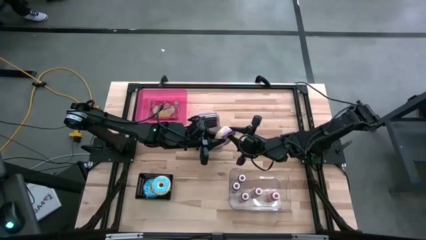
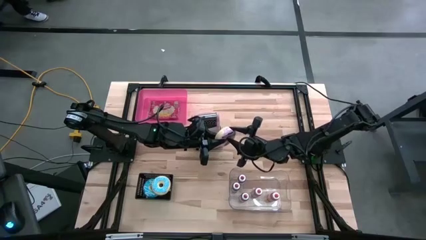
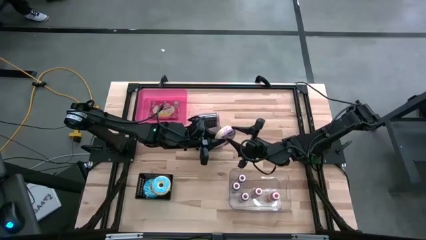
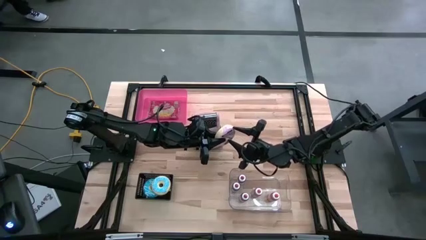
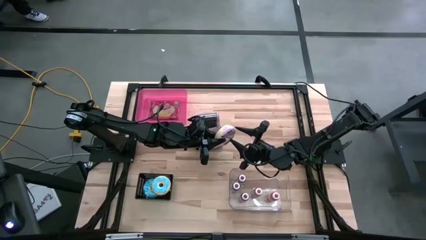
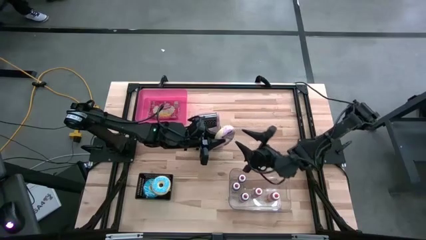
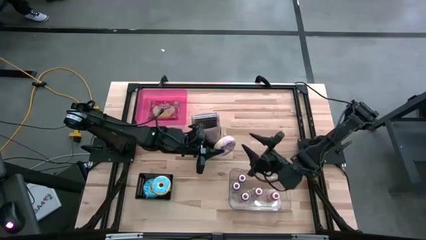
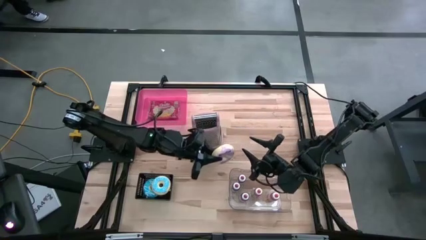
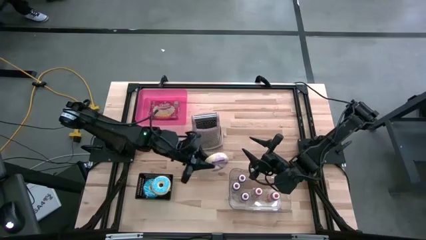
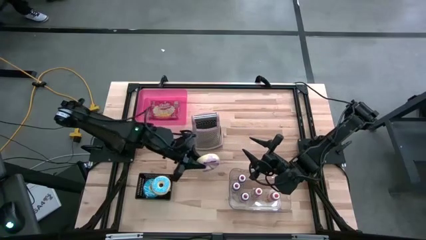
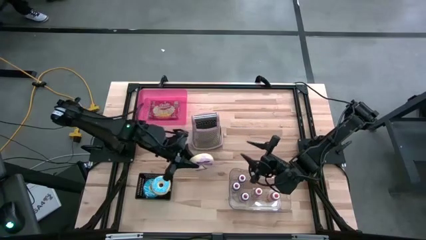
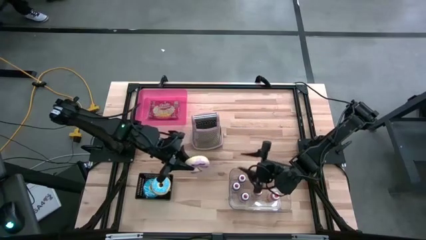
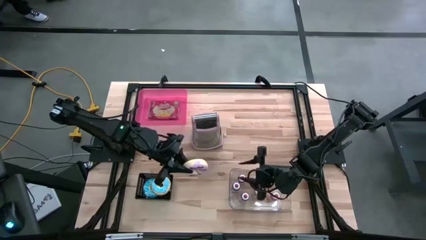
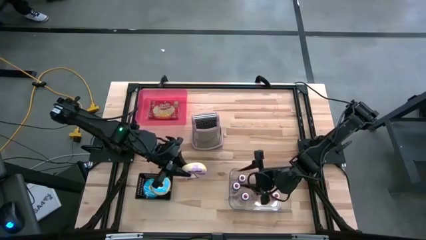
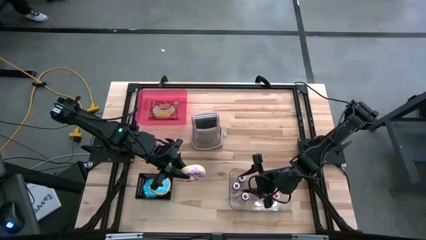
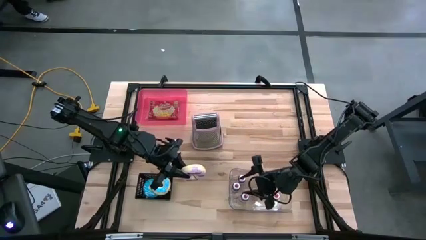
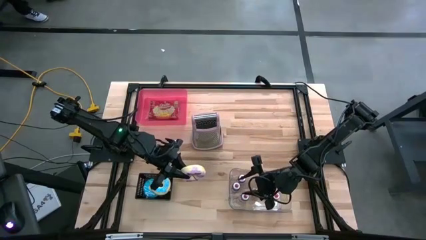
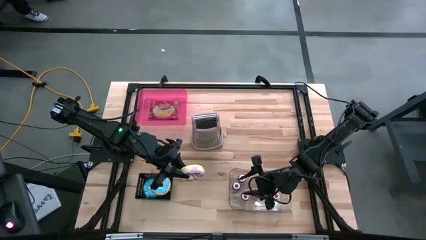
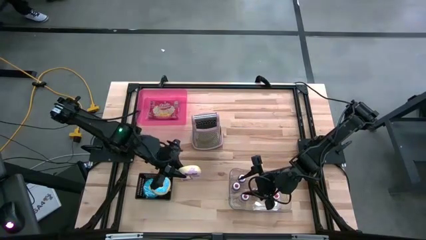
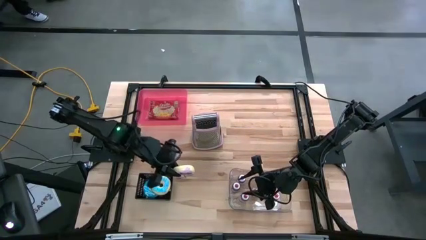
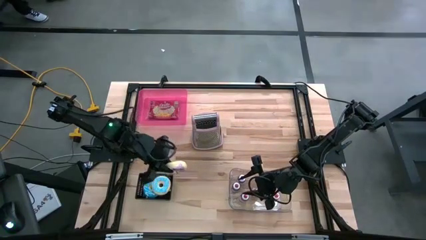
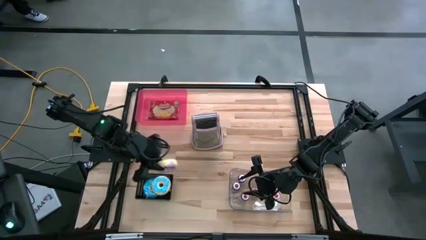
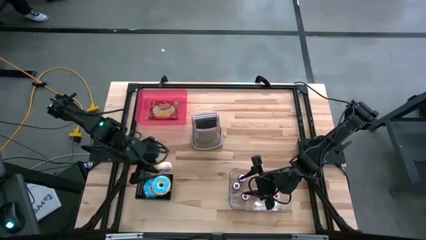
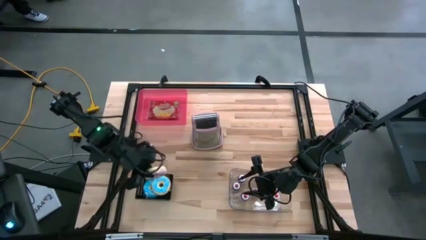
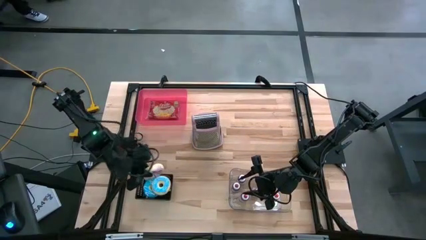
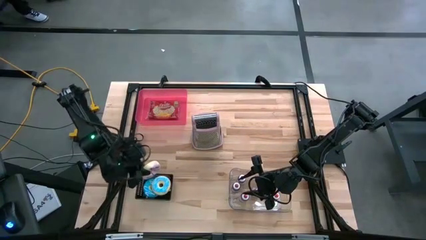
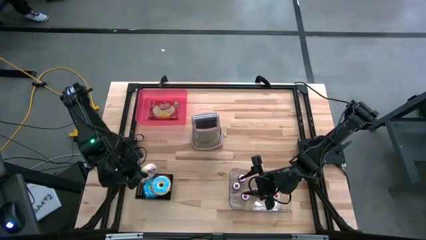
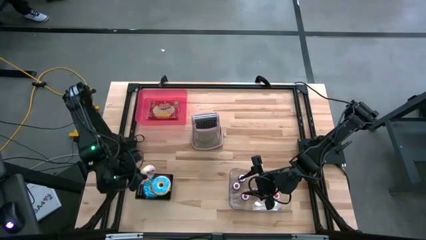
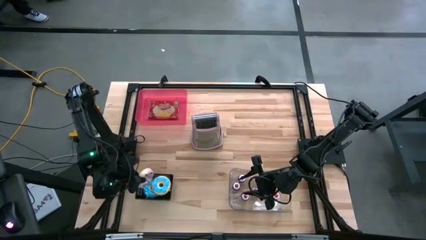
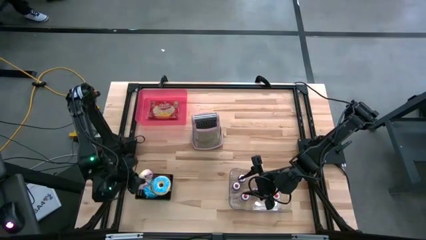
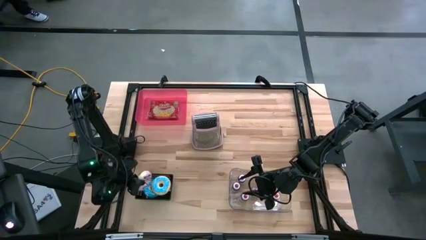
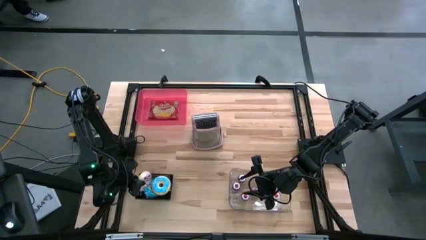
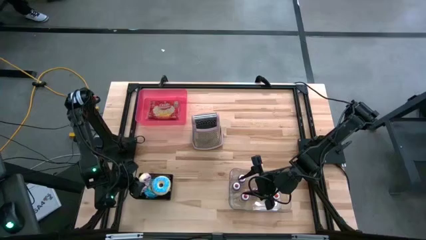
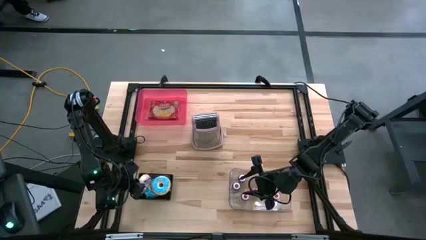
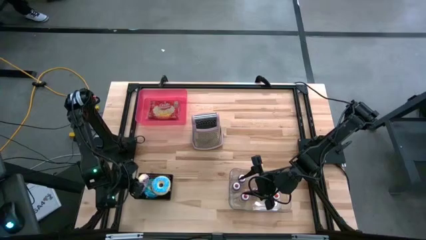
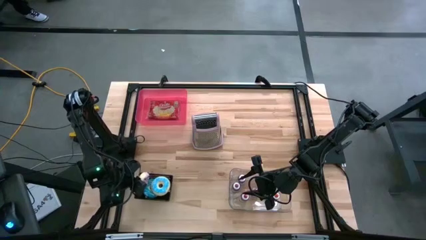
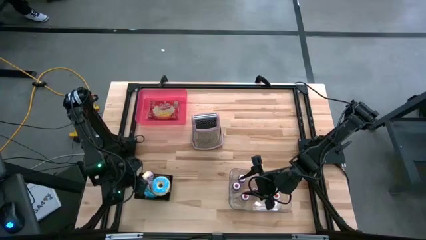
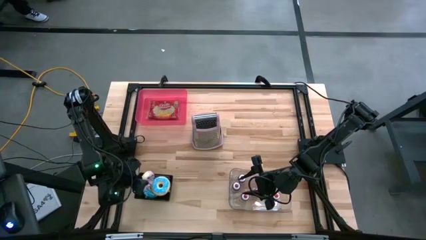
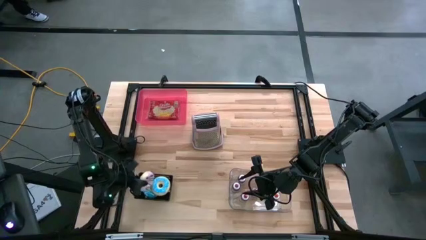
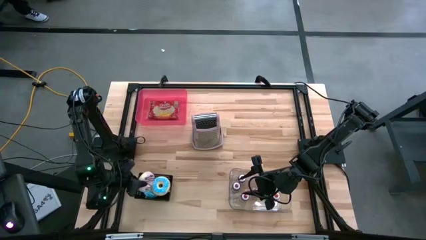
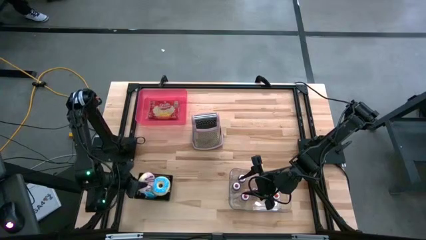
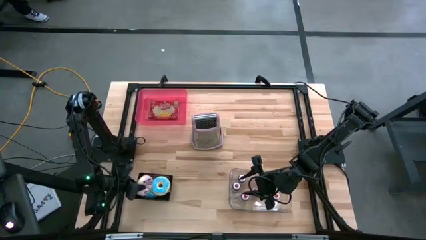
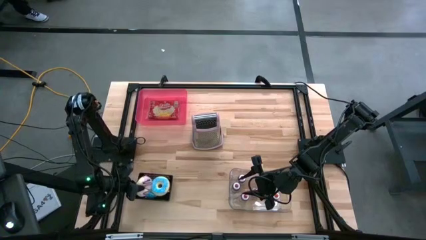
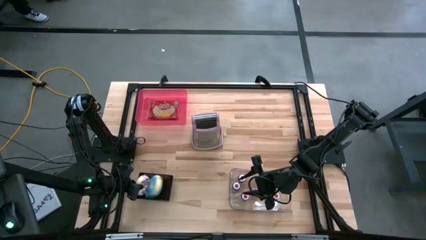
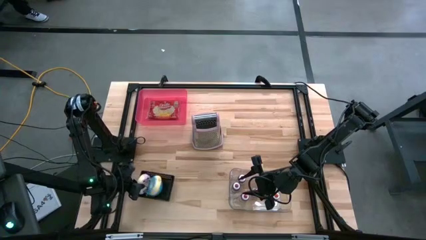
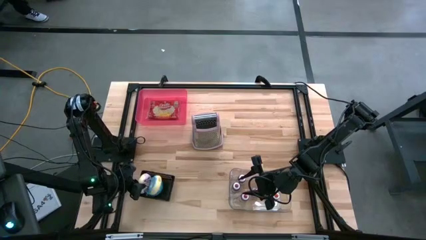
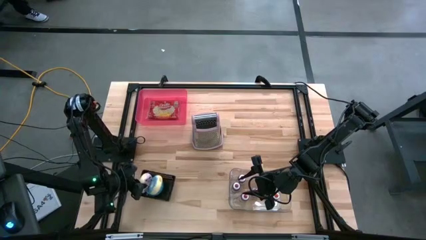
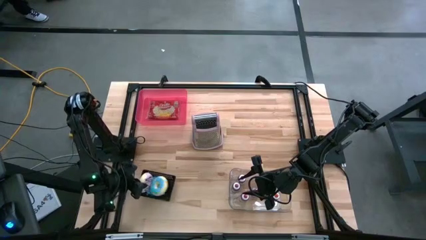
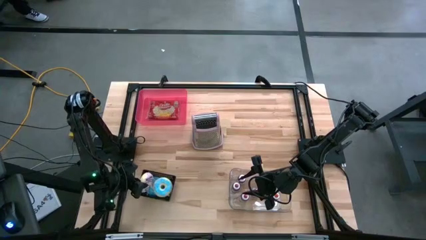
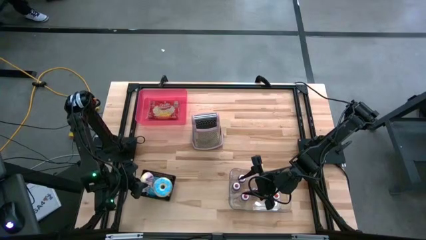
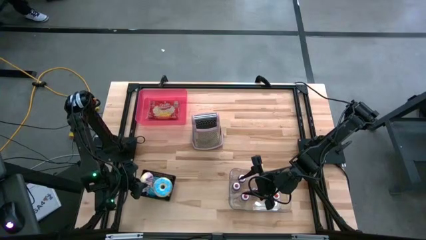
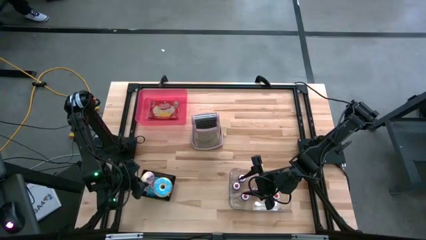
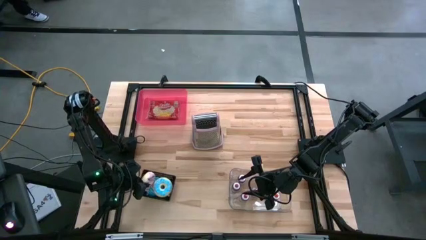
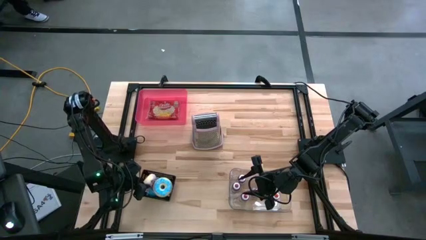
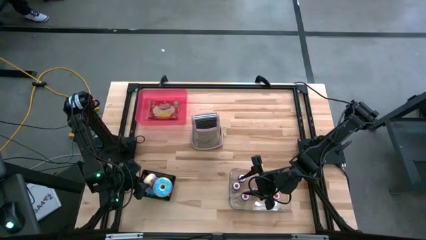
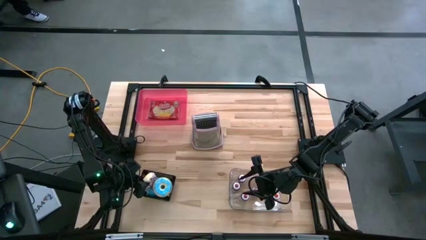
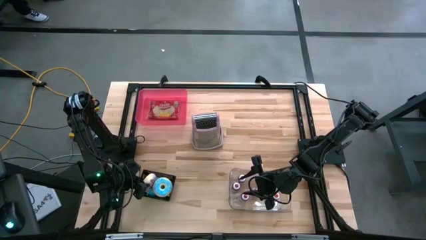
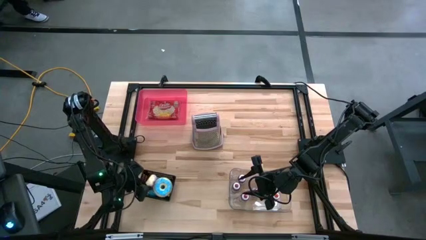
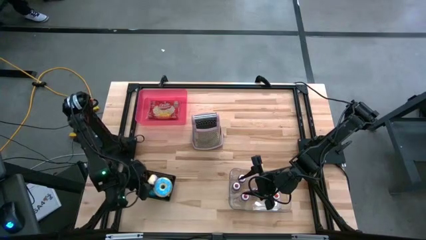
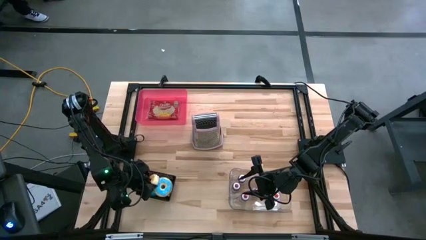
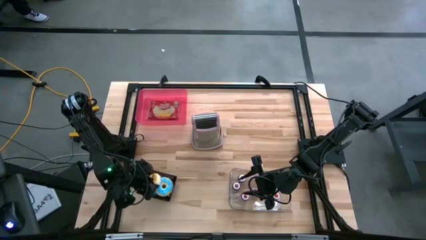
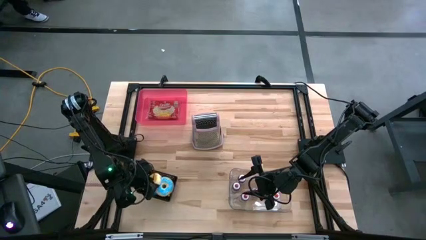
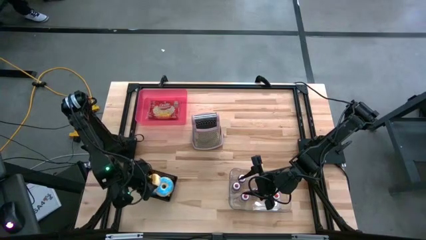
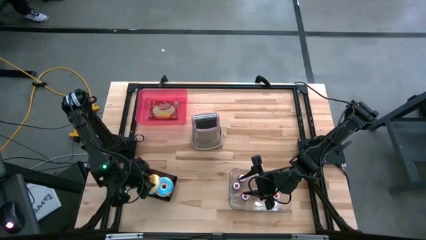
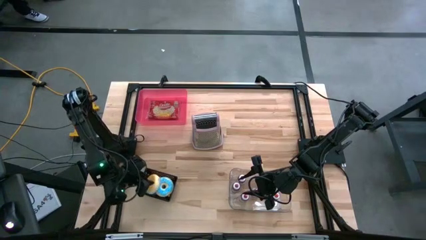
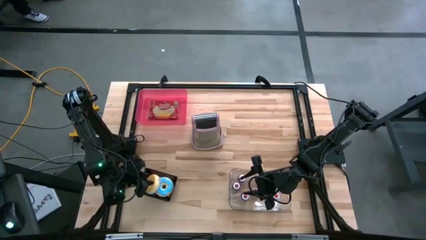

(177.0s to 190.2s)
Task: Pick & Place Food Item
Put the purple donut toy into the black bin

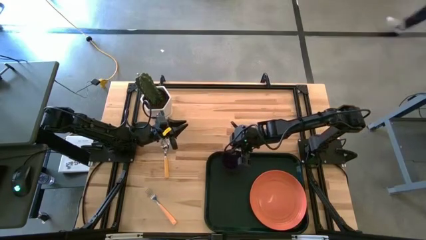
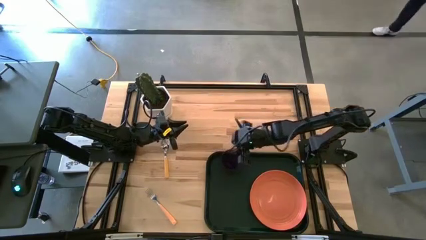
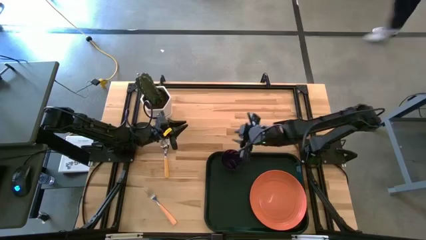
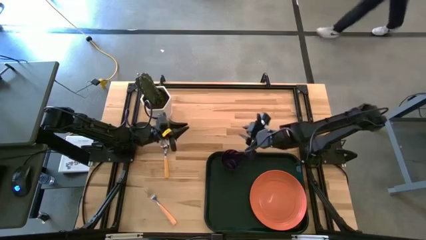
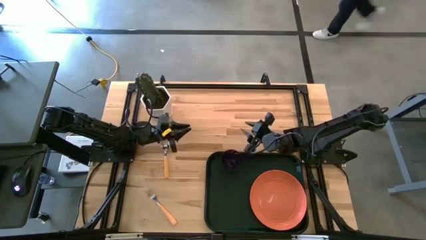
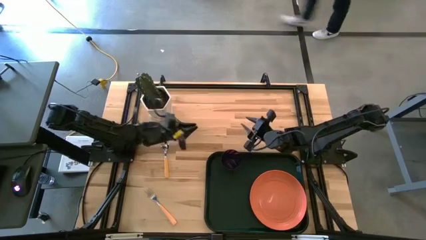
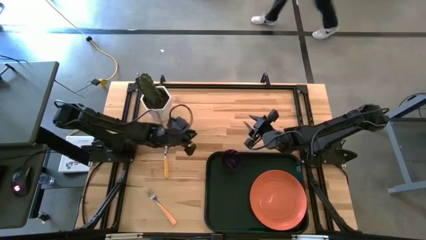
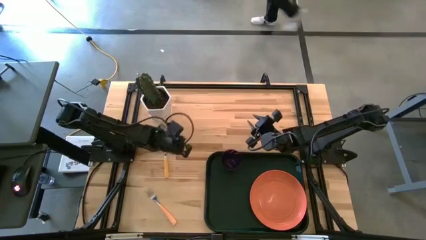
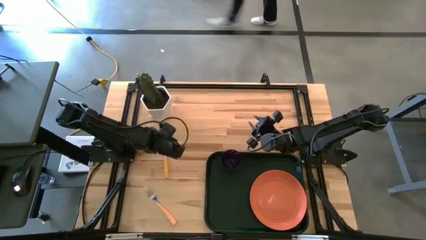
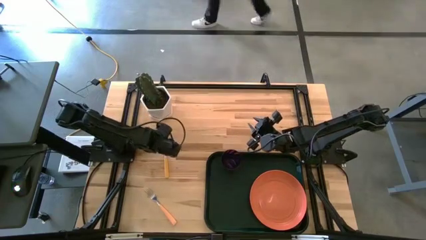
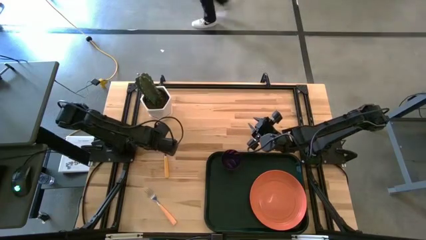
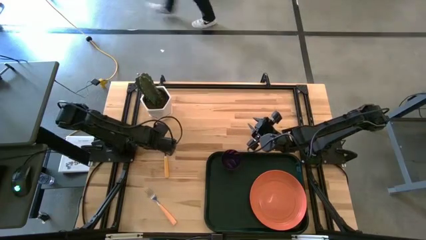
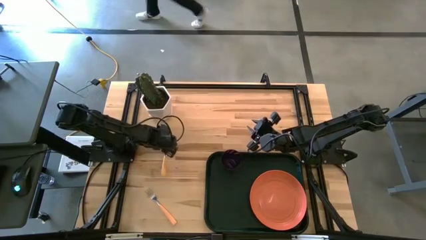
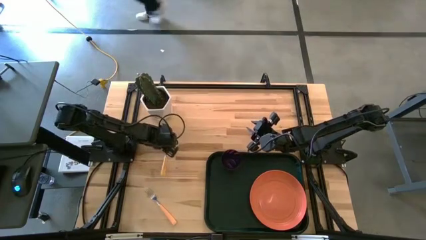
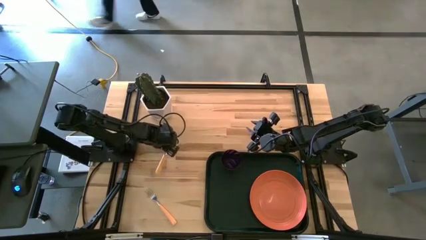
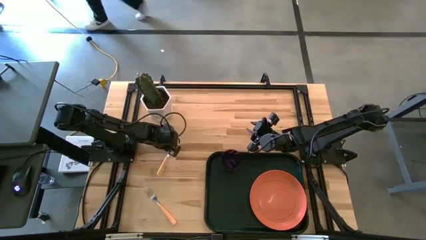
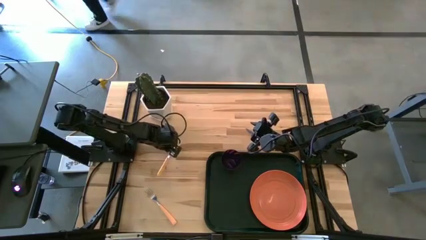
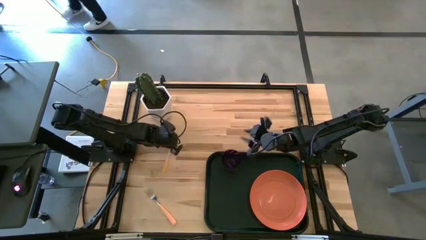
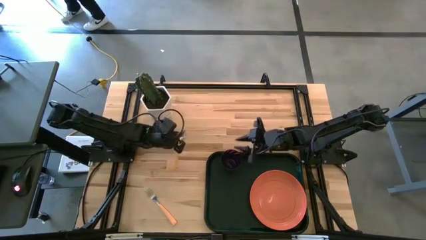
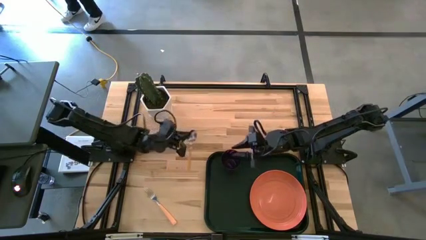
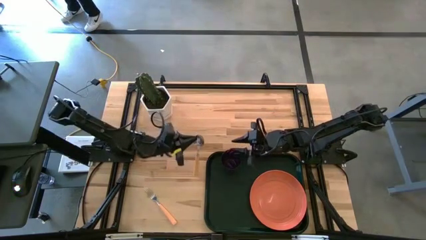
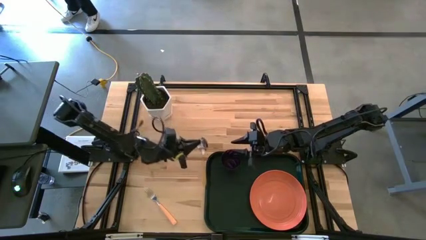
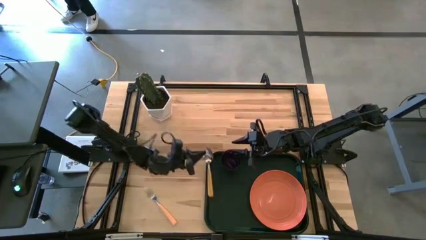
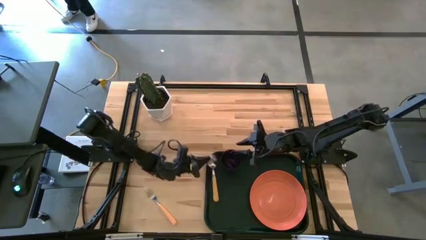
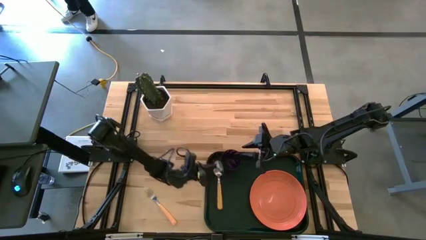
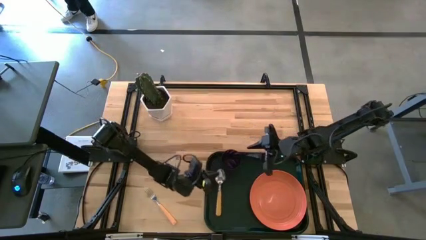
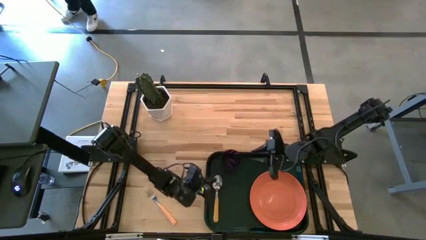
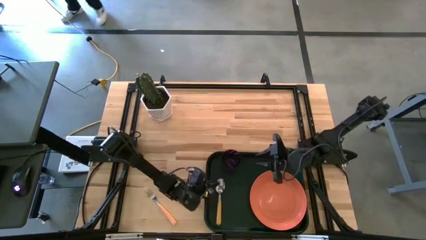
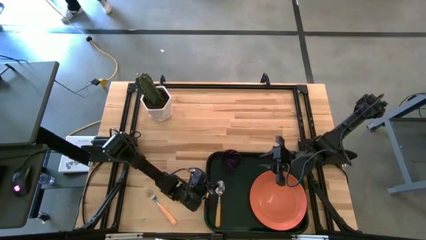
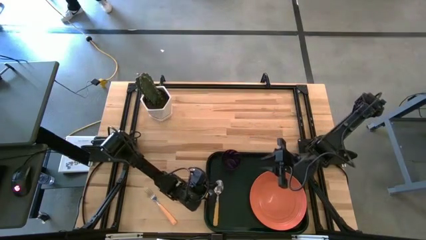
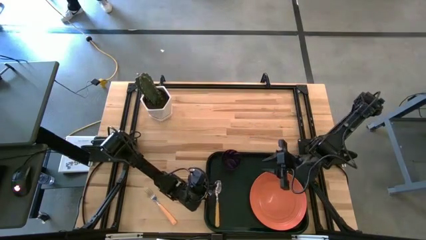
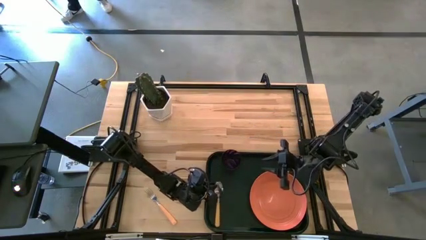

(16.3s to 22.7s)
Task: Pick and place plate/cup/fork/spoon on tray
Put the yellow spoon on the black serving tray to left of the orange plate
